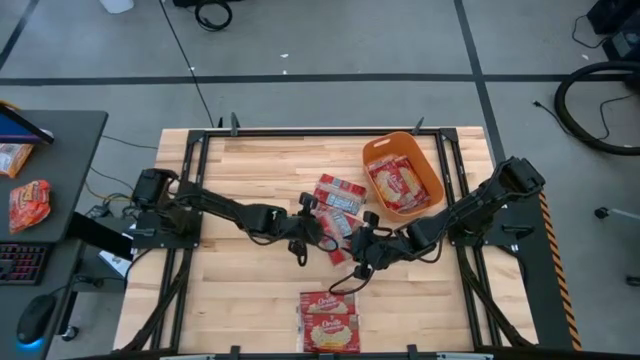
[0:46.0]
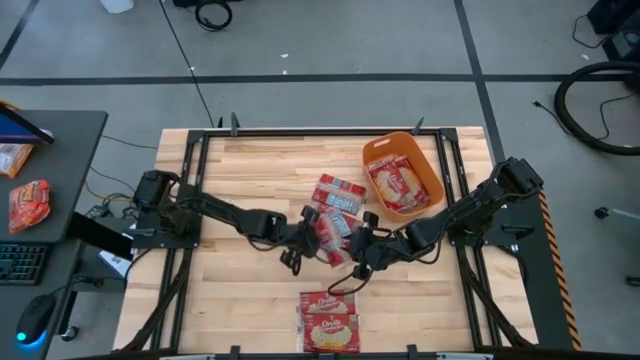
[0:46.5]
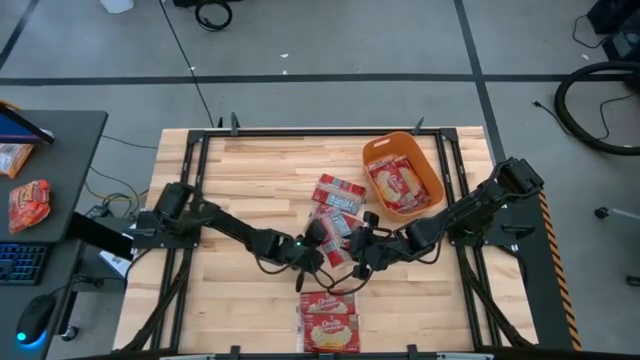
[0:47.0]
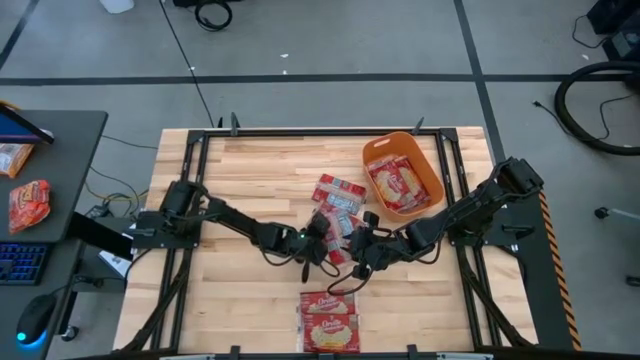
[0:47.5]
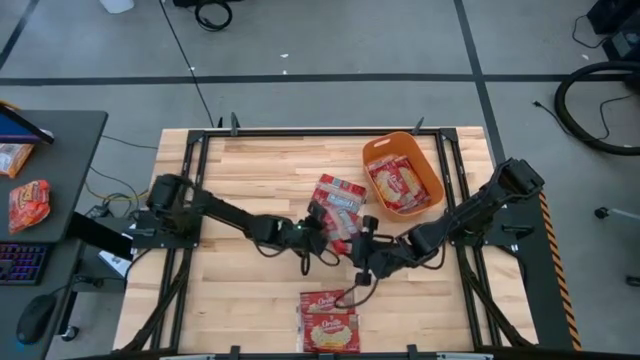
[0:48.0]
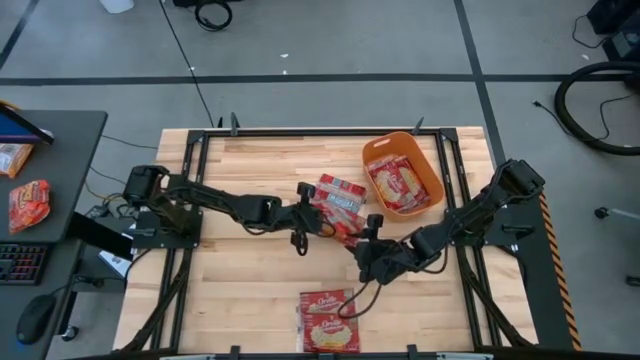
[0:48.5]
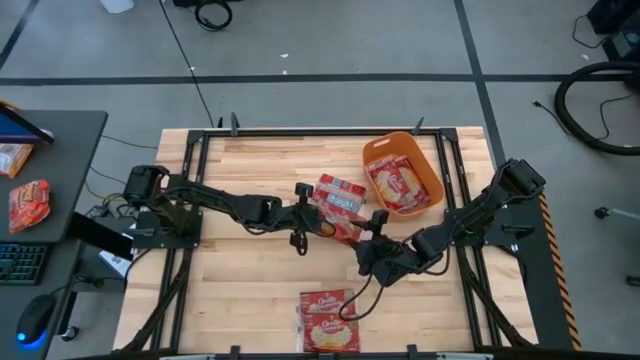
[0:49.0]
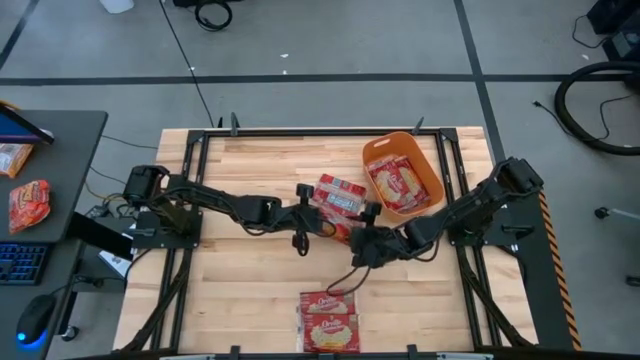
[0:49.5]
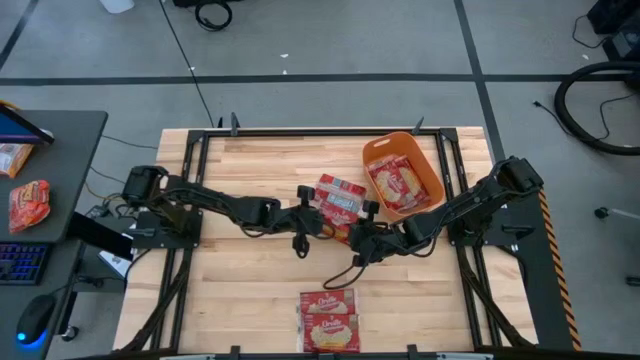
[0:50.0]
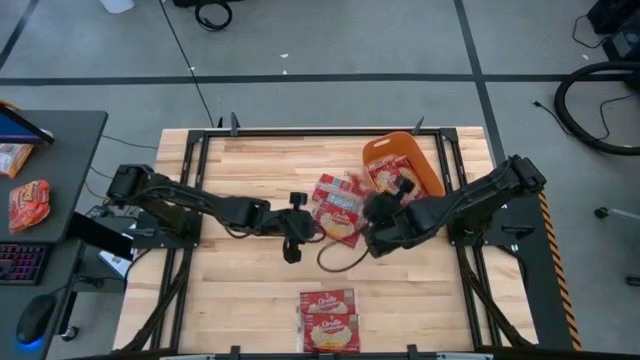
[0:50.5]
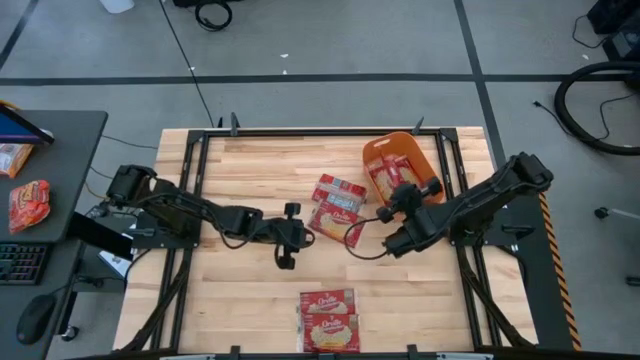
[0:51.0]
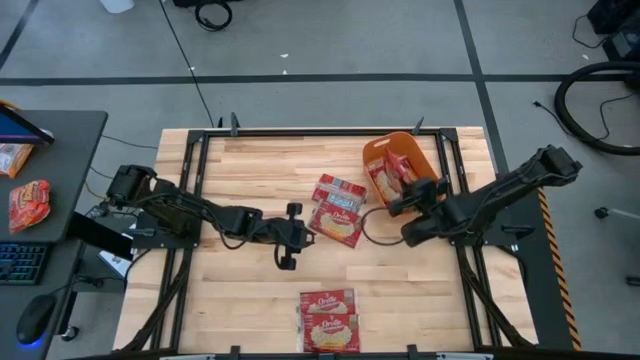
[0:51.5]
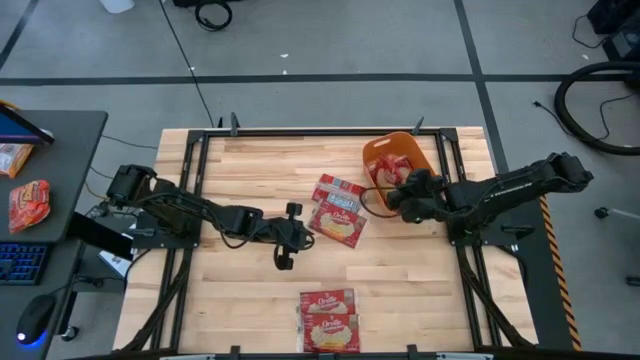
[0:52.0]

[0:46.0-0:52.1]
Task: Sort popcorn bags into baskets
Put the red popcorn bag into the orange bin

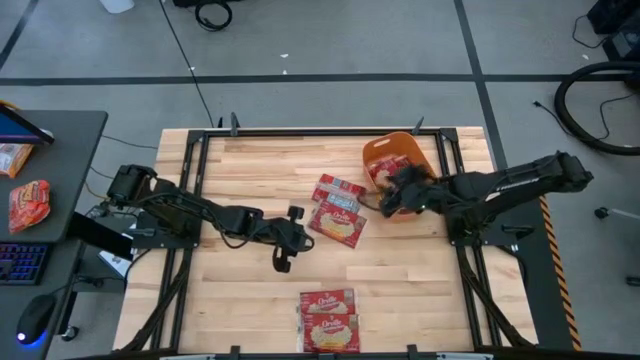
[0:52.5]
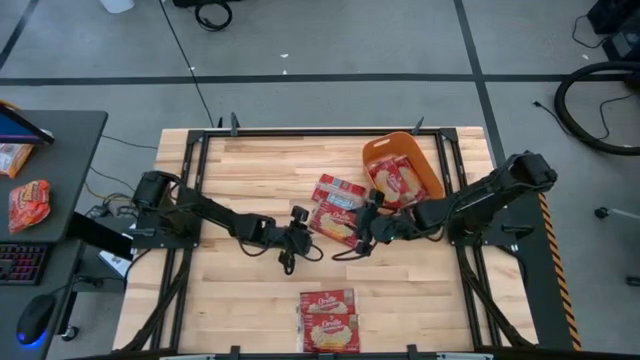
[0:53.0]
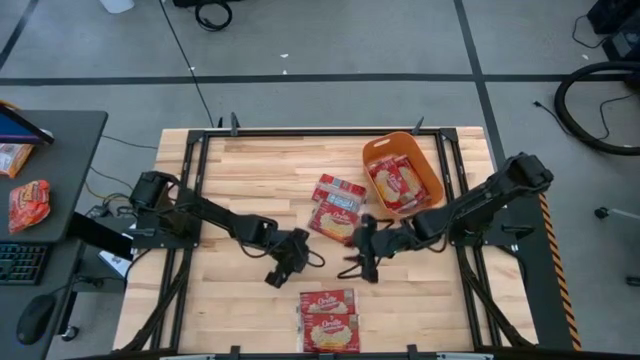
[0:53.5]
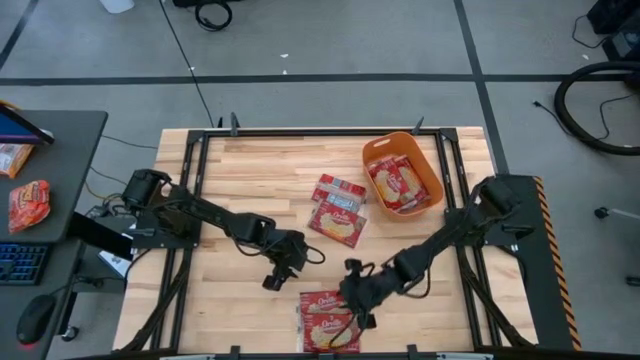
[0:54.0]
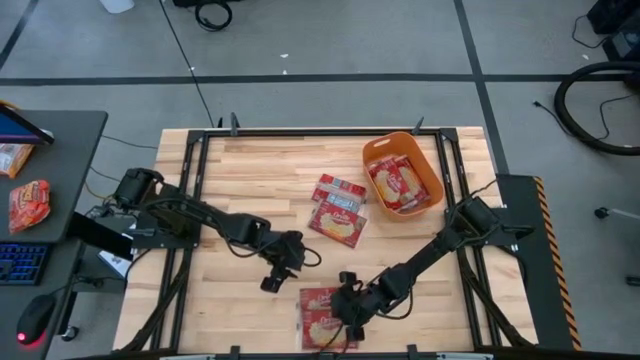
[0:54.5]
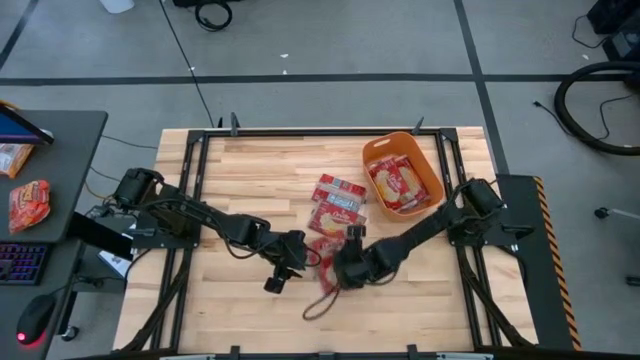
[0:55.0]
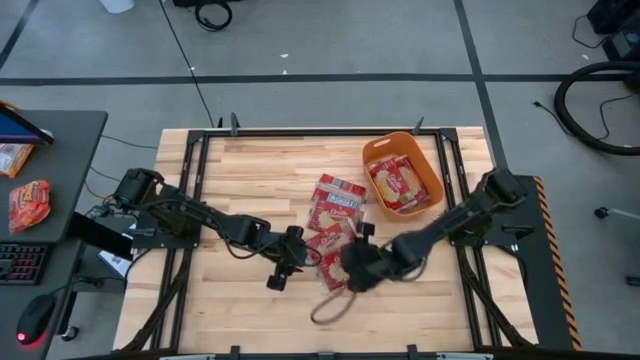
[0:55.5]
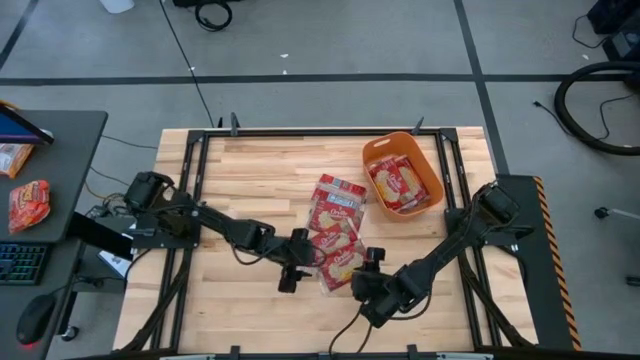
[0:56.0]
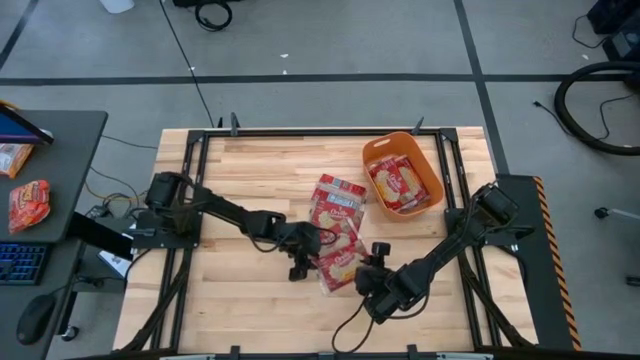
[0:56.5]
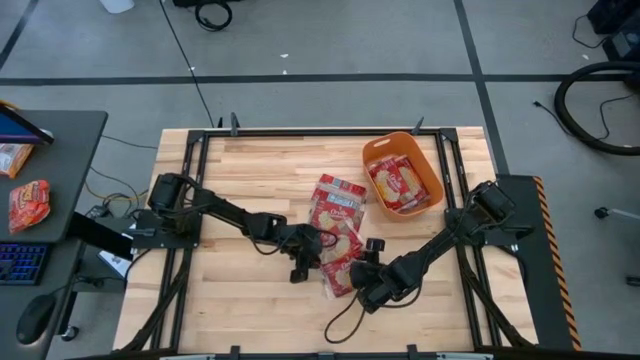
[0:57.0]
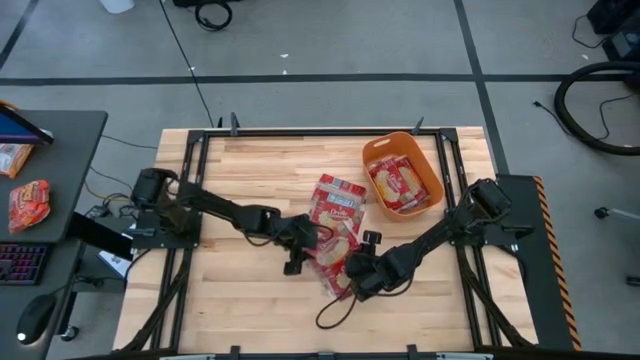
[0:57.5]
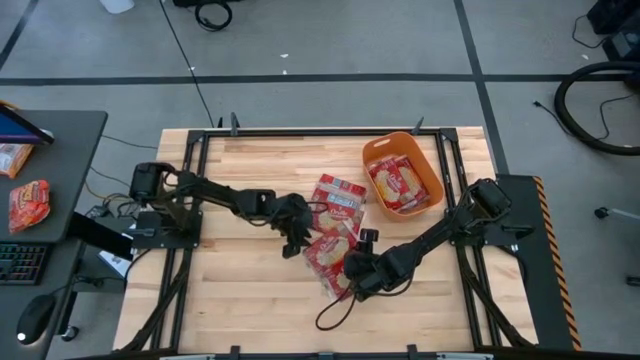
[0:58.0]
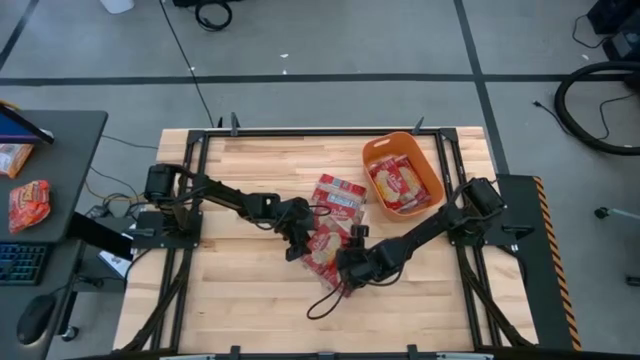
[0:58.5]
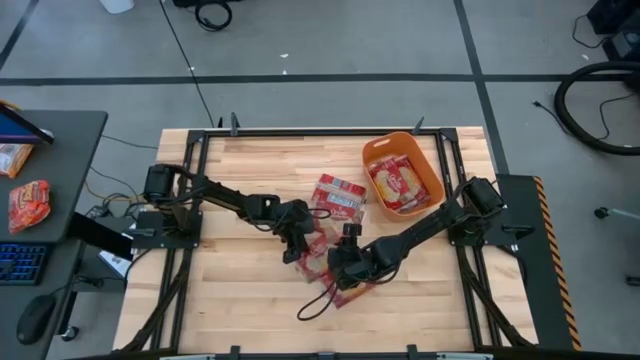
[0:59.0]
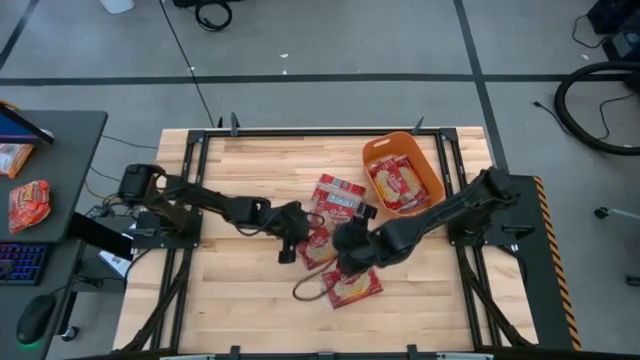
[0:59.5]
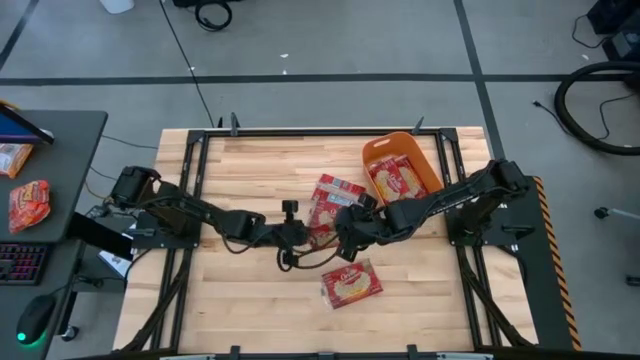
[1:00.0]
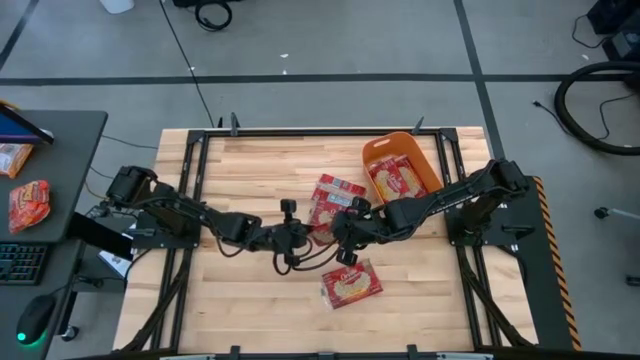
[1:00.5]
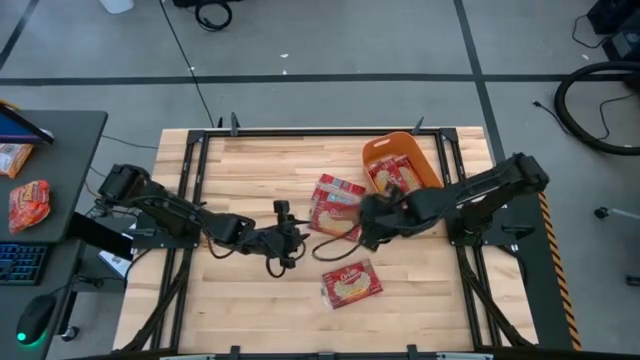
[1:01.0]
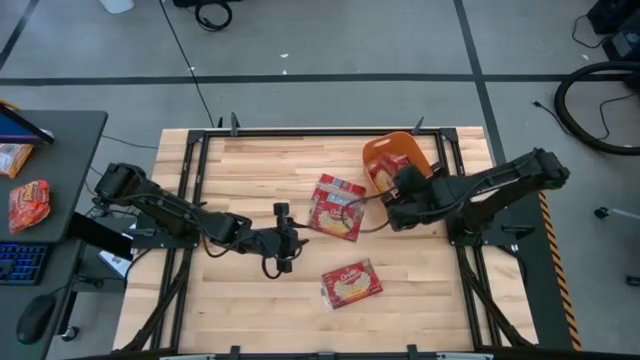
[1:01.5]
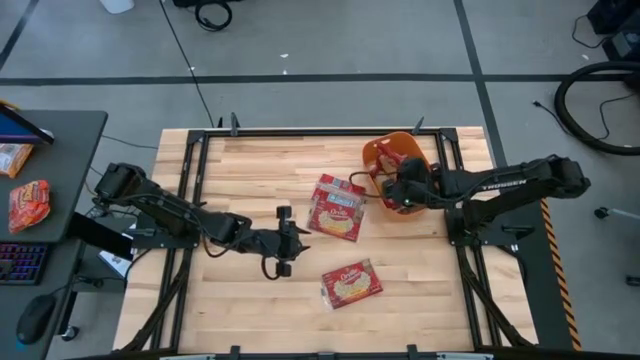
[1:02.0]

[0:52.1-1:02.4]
Put the red popcorn bag into the orange bin

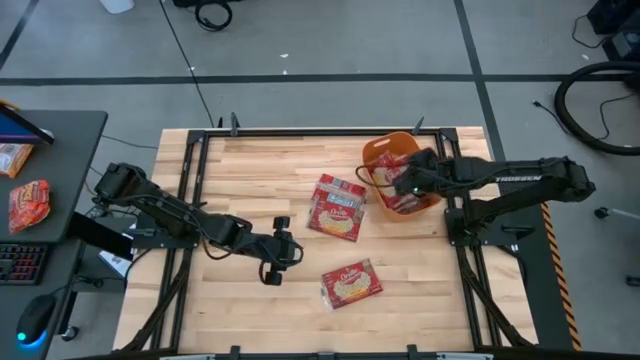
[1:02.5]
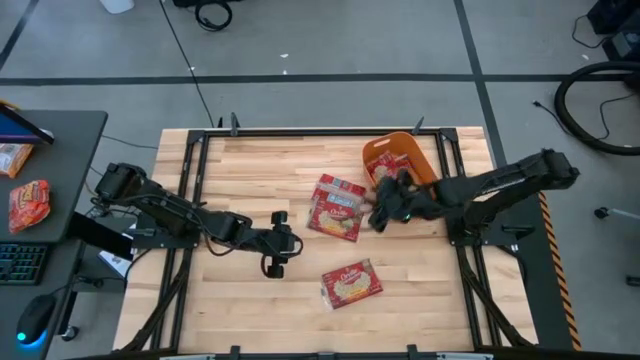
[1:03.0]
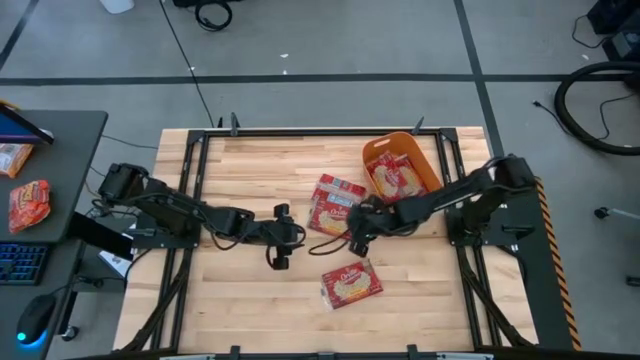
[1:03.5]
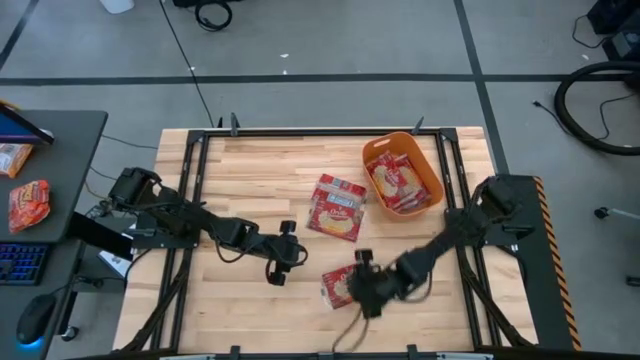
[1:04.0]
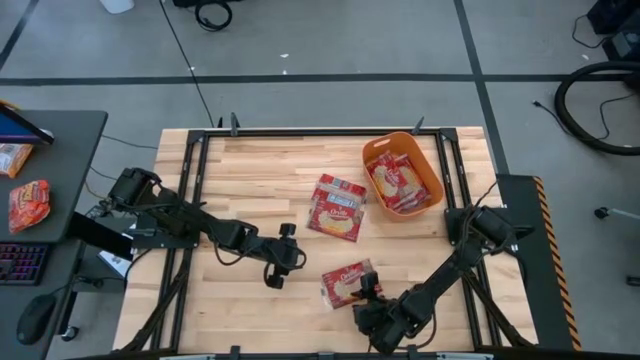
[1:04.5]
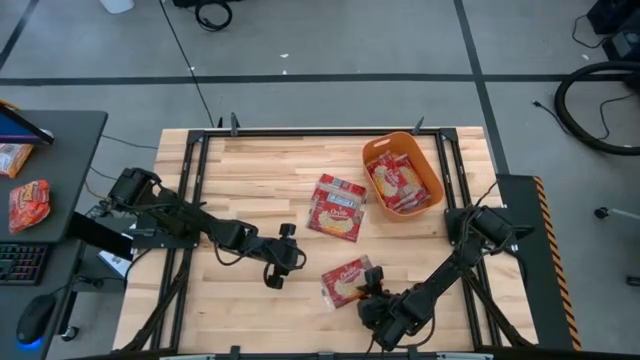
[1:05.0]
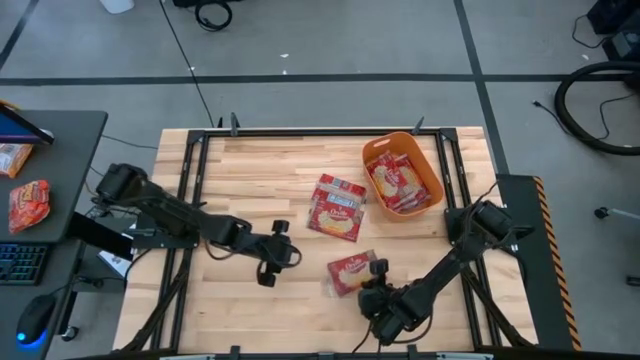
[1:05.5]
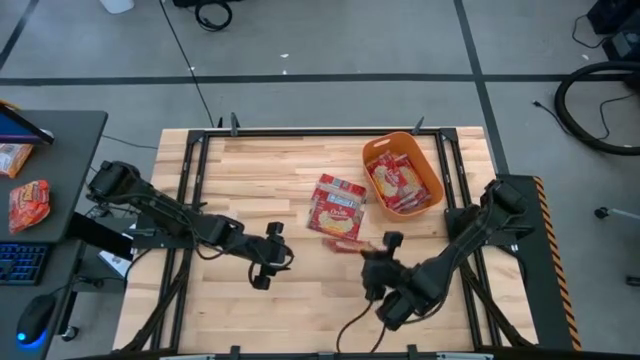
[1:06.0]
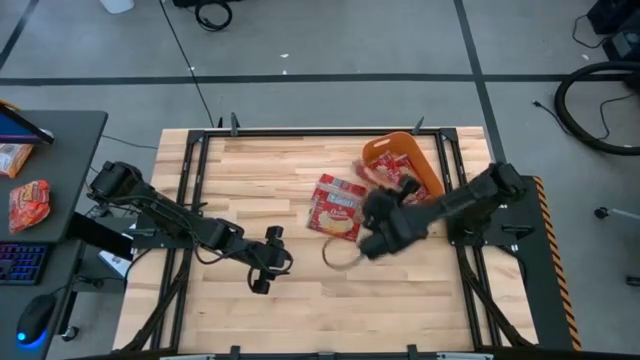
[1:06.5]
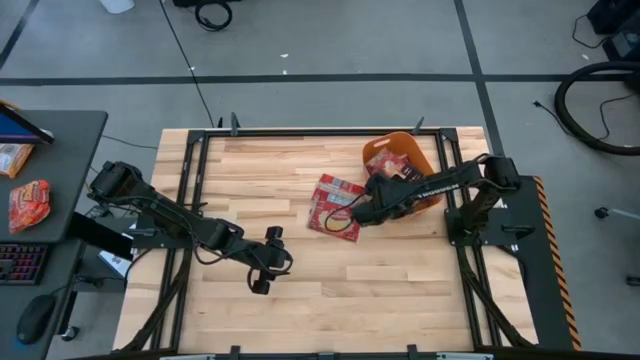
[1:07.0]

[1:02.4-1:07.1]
Put the red popcorn bag into the orange bin

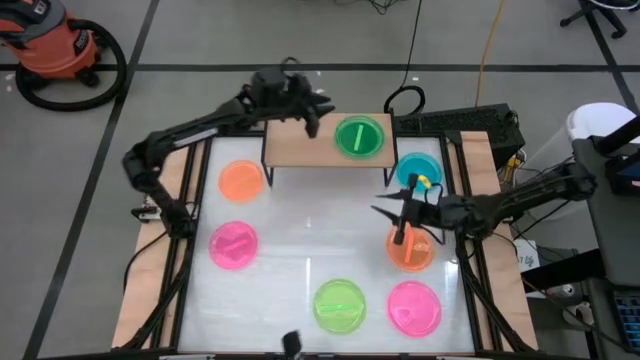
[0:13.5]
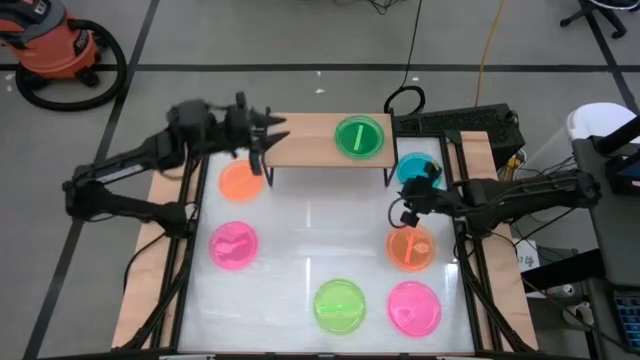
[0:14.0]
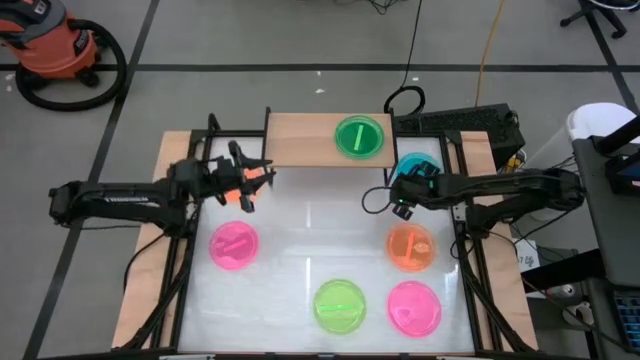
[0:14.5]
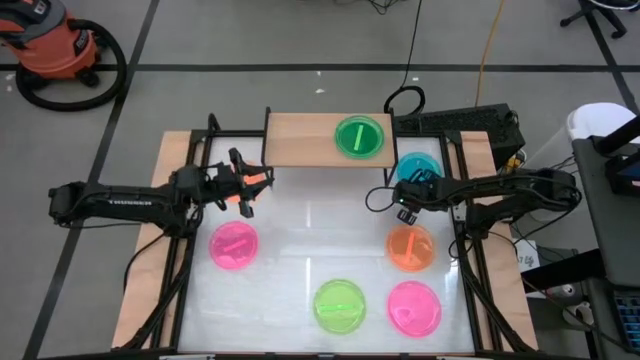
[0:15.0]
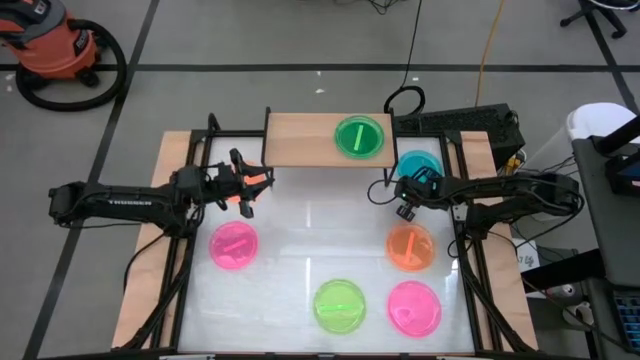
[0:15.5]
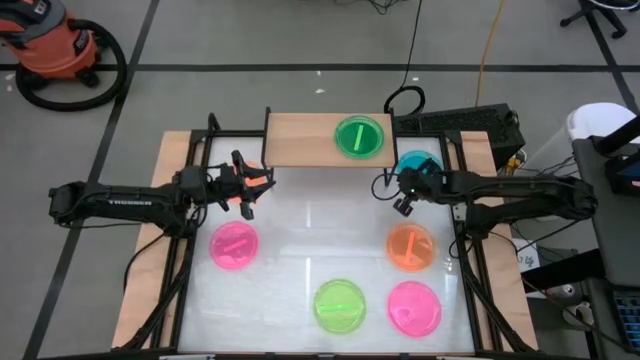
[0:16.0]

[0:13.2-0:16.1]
Task: Place and stack plates onto a shelf
Stack the blue transparent plate on the green transparent plate on the shelf
